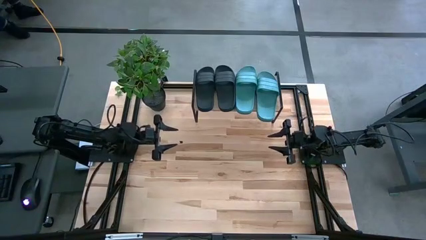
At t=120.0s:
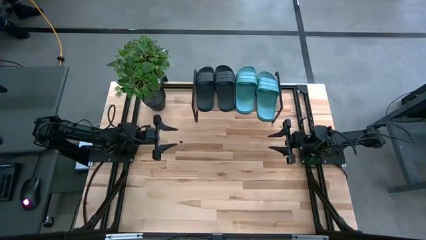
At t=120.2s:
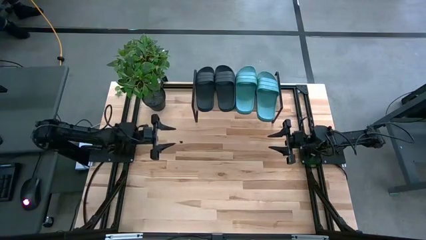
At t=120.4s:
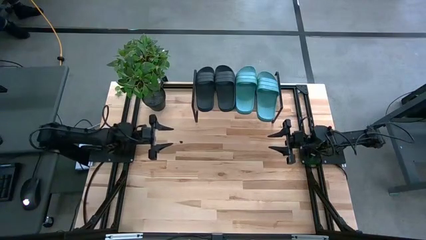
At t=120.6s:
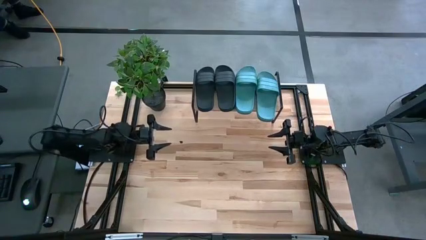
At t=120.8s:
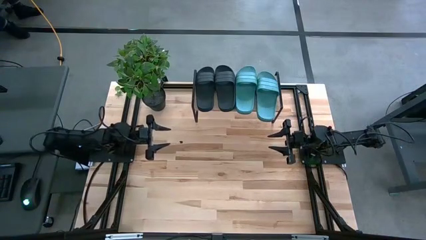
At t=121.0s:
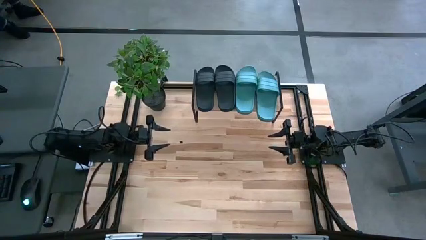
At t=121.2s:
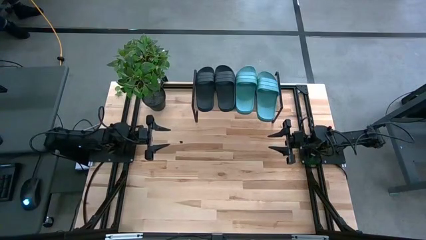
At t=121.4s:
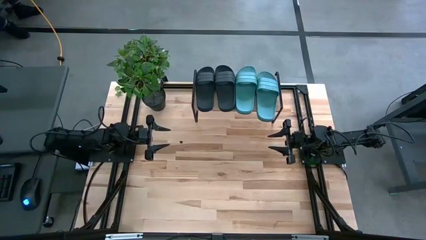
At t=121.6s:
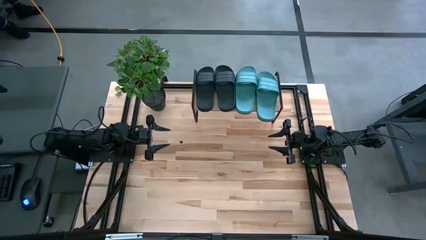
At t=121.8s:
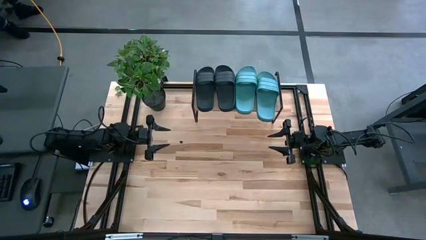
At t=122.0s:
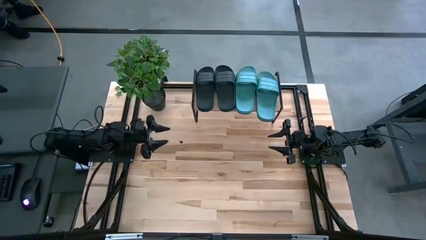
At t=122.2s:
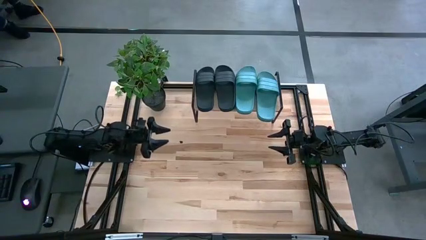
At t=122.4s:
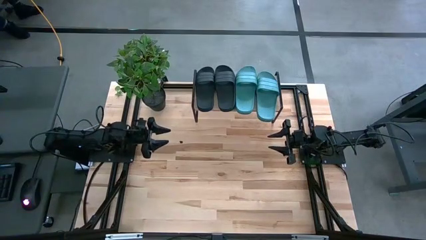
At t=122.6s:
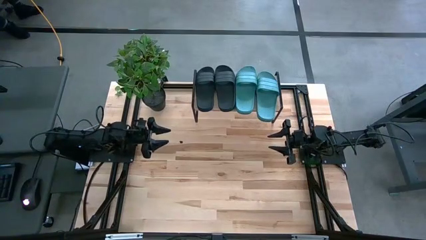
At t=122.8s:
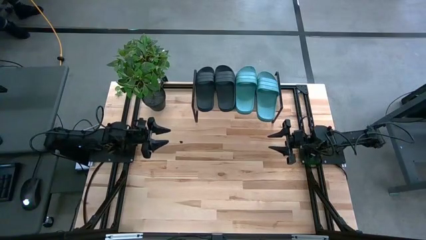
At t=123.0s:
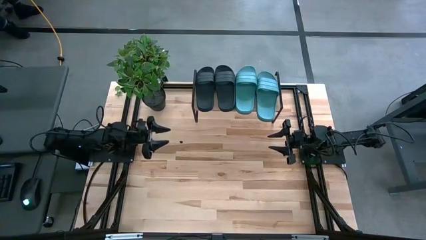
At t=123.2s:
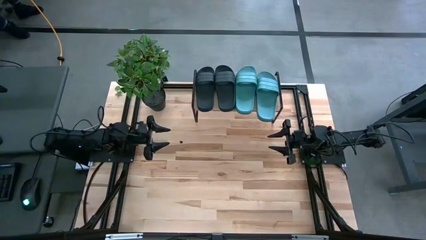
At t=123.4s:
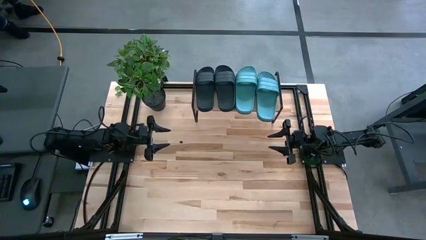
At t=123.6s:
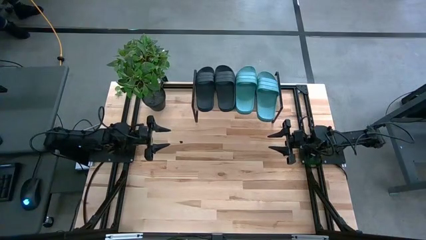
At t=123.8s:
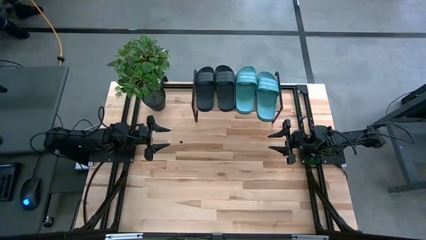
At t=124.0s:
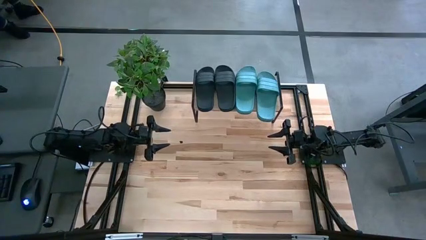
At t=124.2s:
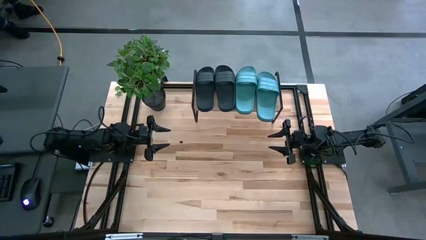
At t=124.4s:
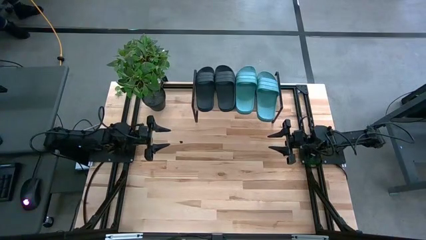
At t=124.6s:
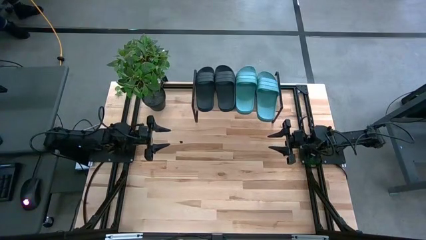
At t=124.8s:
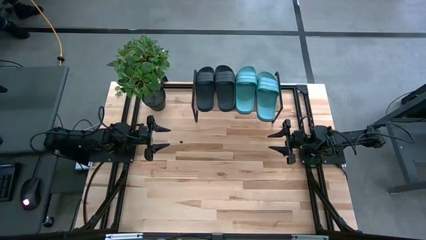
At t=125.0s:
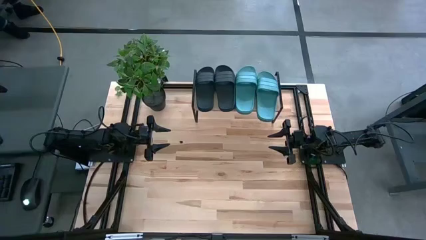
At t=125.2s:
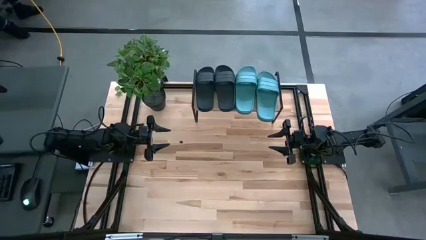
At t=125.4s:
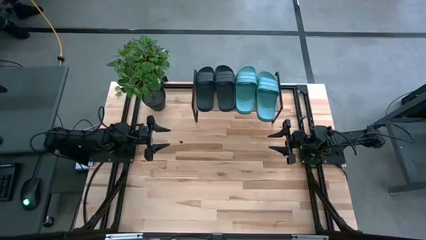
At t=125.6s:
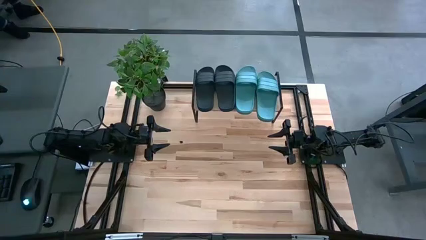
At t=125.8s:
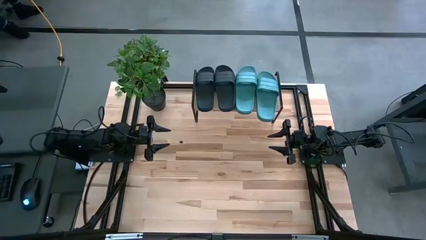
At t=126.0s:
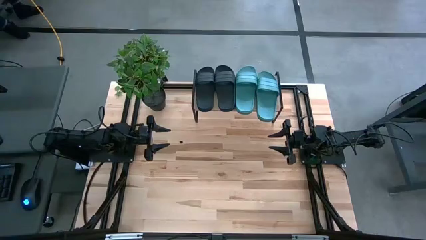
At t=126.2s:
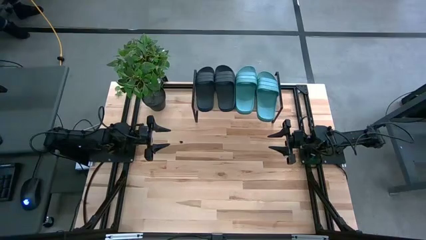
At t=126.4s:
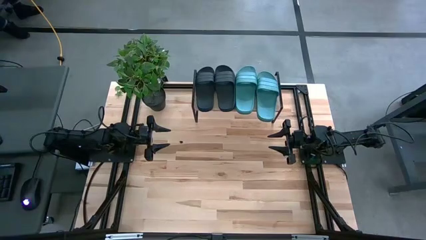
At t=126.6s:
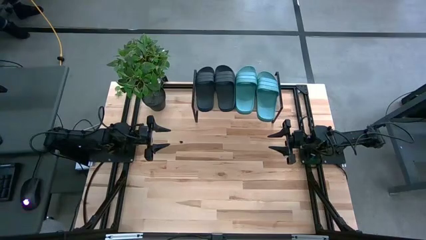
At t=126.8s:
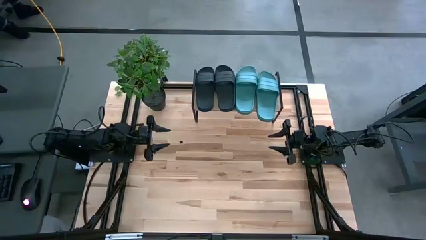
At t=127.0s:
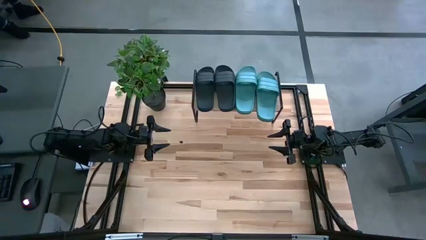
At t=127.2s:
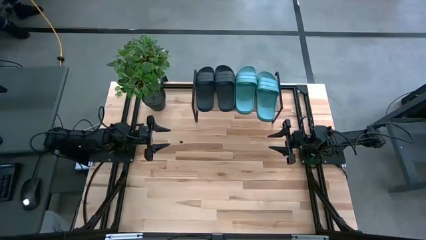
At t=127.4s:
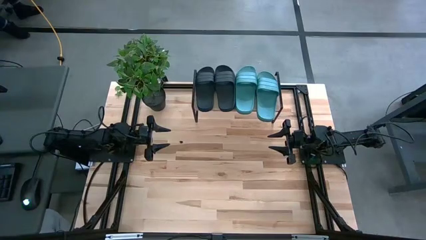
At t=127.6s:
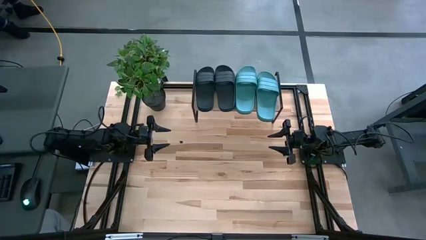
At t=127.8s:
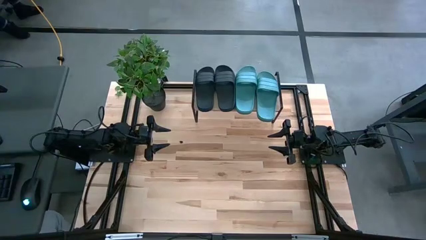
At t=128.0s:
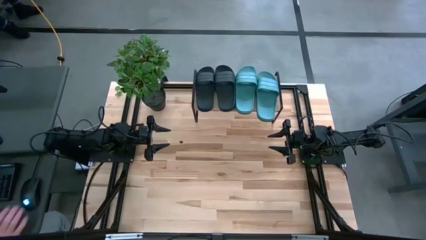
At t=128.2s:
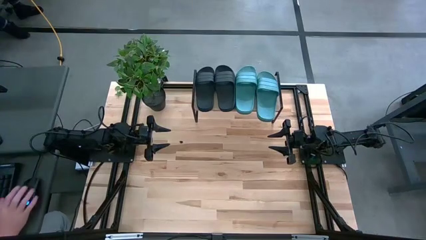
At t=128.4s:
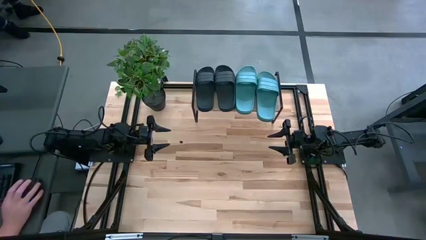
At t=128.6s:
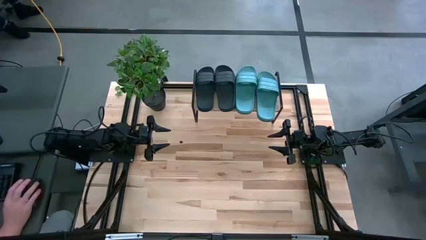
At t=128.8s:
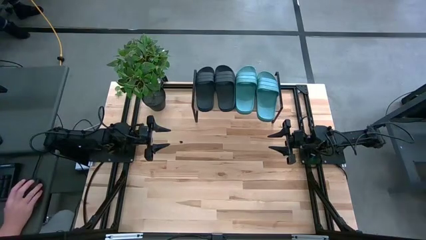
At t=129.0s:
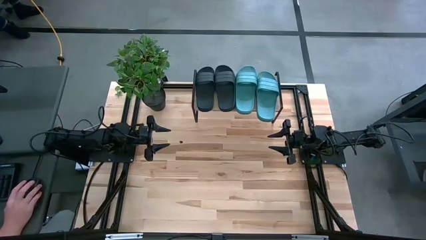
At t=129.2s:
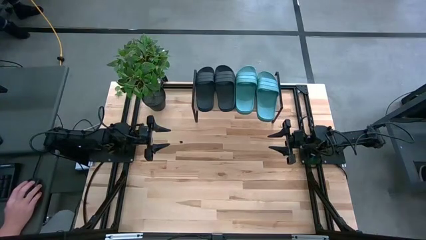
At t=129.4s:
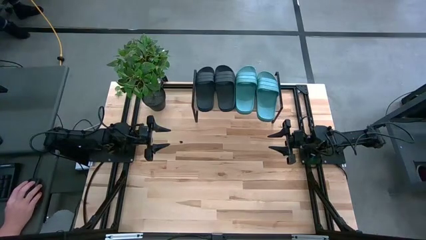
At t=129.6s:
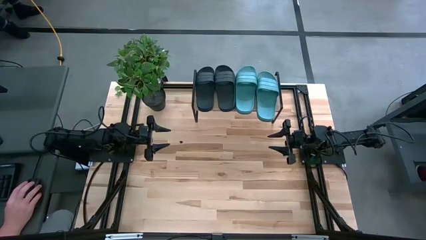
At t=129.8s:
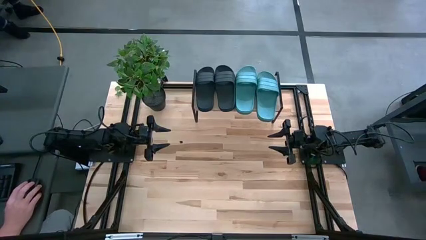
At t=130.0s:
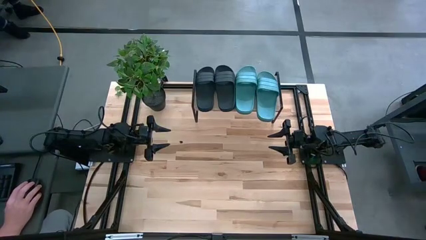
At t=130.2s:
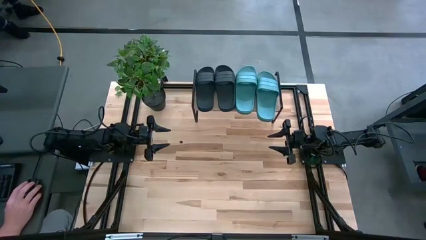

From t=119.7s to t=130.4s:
Task: Pick and place slides into the shelf
Return to Home Position
